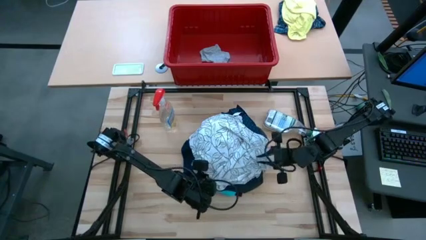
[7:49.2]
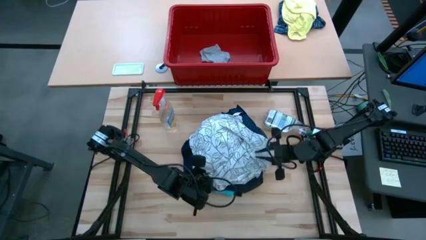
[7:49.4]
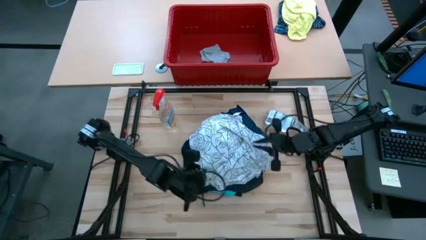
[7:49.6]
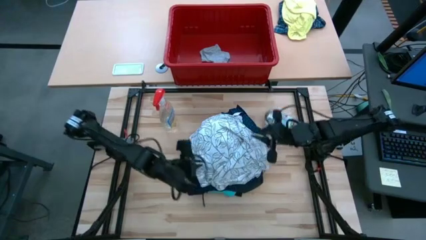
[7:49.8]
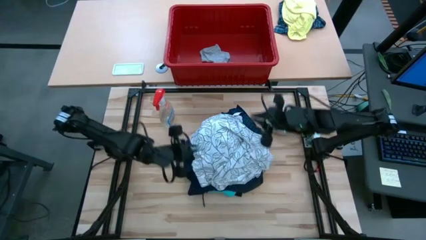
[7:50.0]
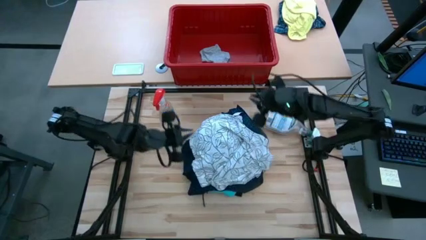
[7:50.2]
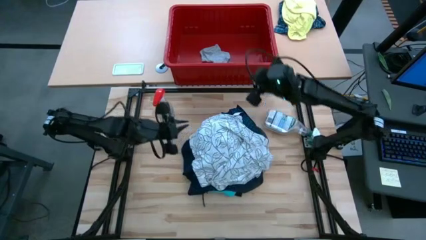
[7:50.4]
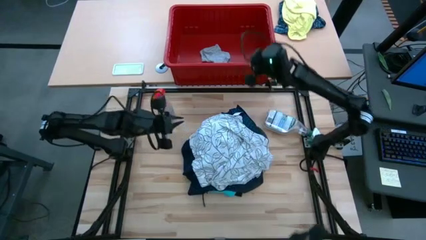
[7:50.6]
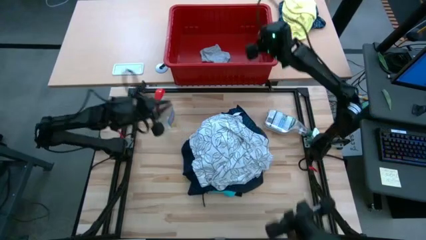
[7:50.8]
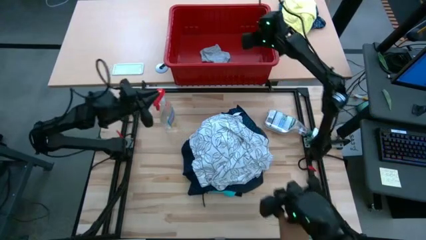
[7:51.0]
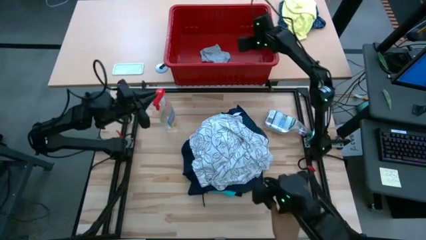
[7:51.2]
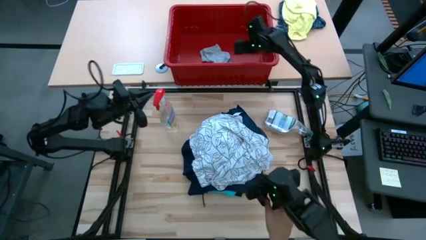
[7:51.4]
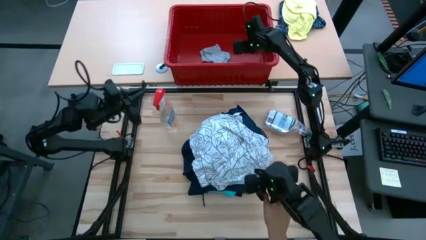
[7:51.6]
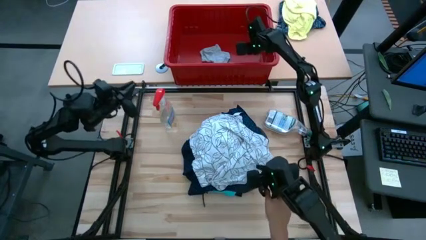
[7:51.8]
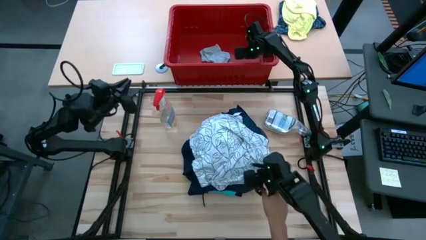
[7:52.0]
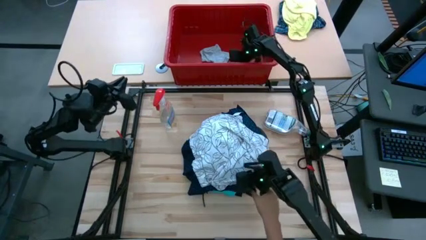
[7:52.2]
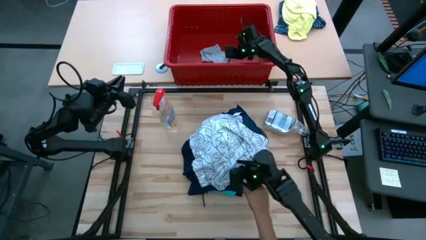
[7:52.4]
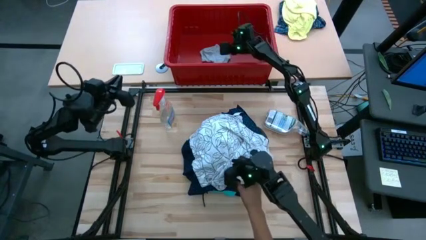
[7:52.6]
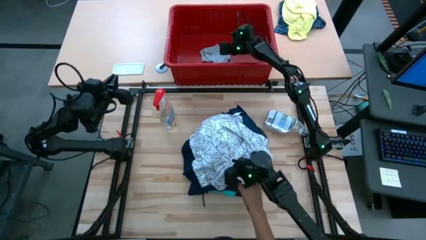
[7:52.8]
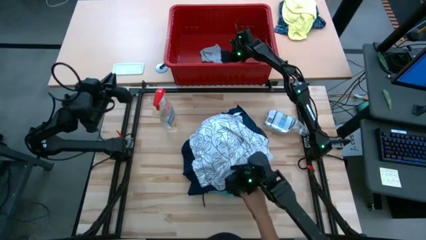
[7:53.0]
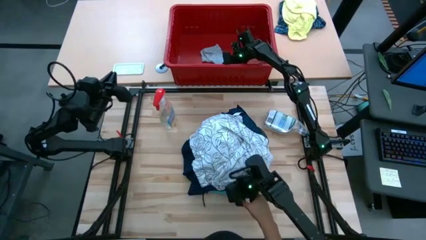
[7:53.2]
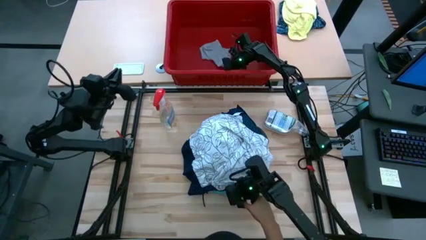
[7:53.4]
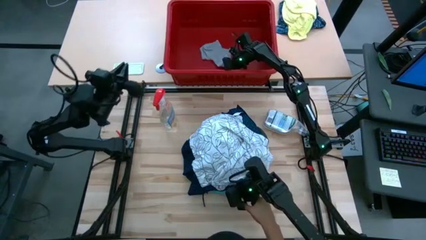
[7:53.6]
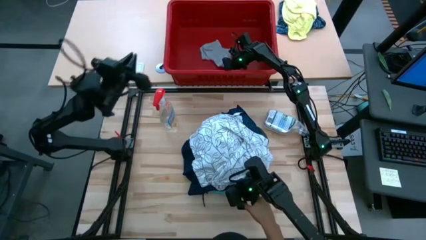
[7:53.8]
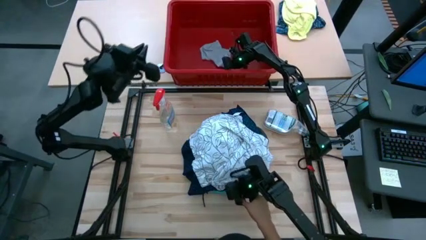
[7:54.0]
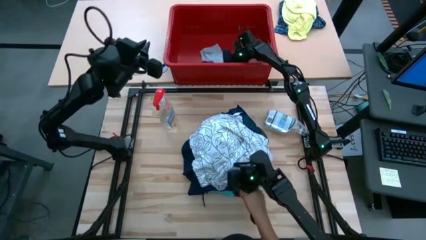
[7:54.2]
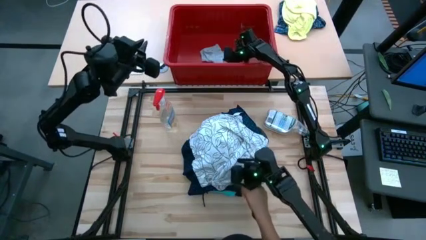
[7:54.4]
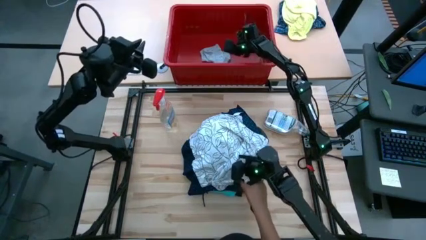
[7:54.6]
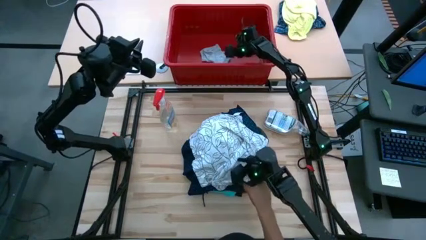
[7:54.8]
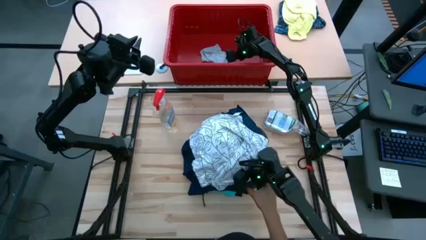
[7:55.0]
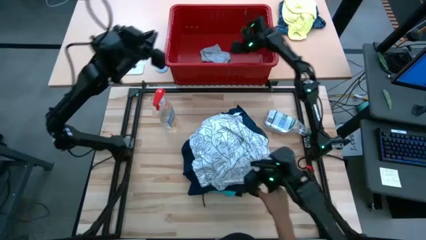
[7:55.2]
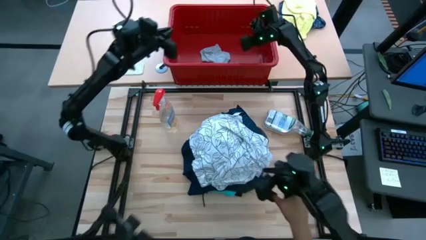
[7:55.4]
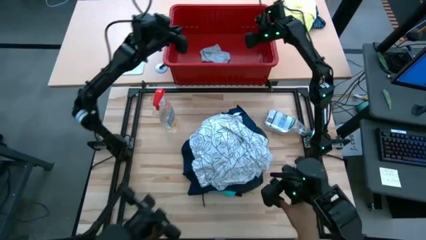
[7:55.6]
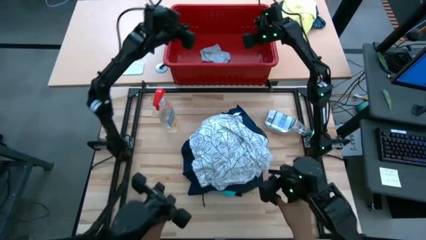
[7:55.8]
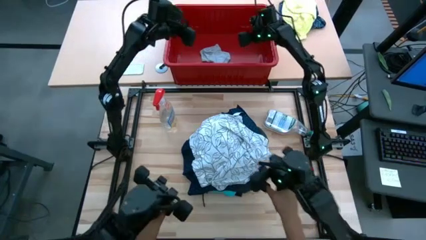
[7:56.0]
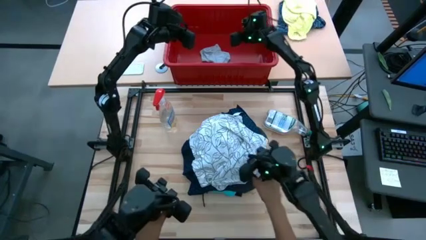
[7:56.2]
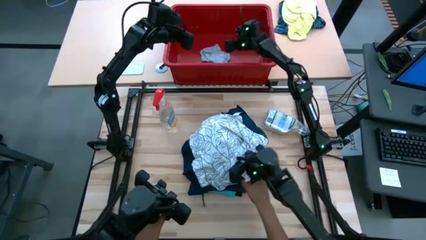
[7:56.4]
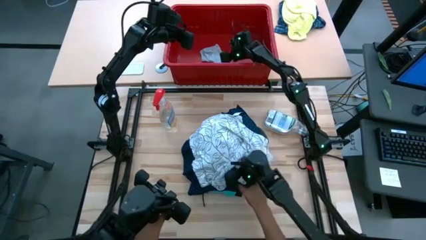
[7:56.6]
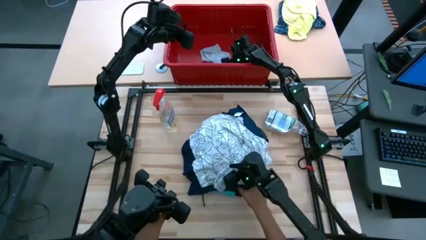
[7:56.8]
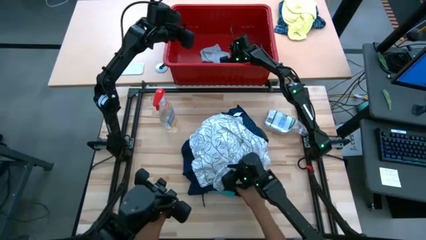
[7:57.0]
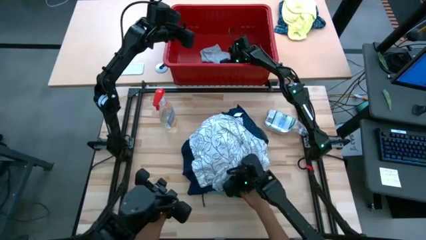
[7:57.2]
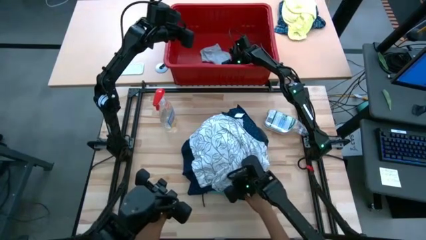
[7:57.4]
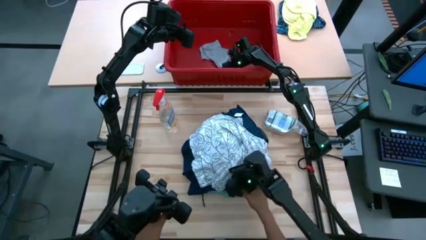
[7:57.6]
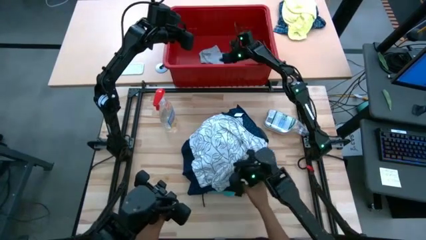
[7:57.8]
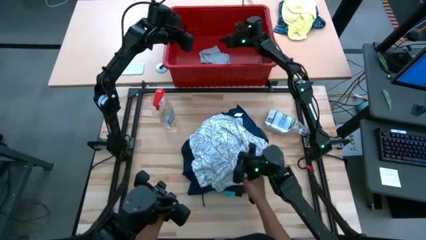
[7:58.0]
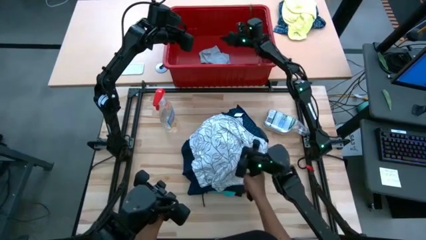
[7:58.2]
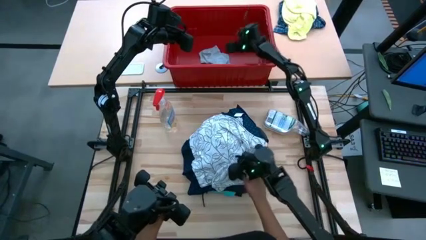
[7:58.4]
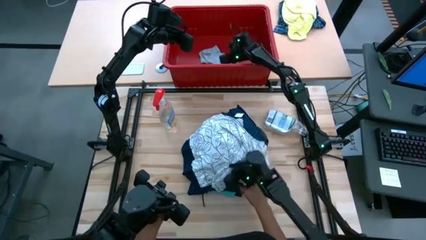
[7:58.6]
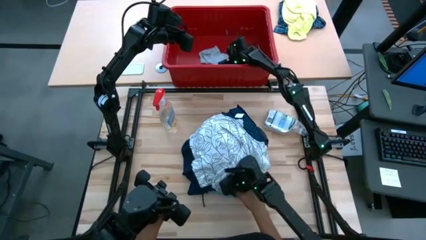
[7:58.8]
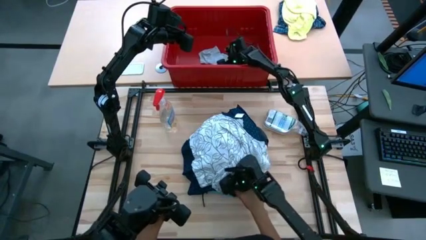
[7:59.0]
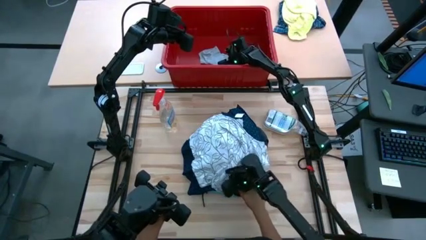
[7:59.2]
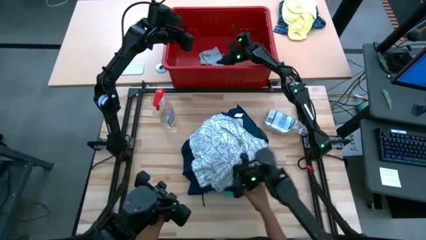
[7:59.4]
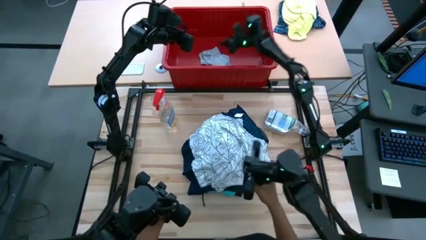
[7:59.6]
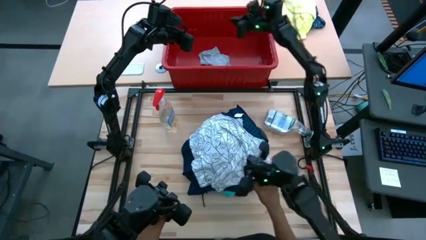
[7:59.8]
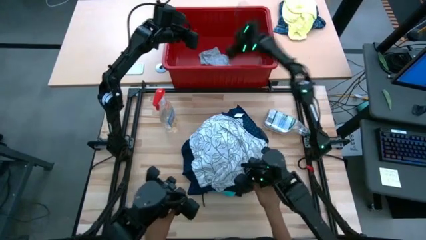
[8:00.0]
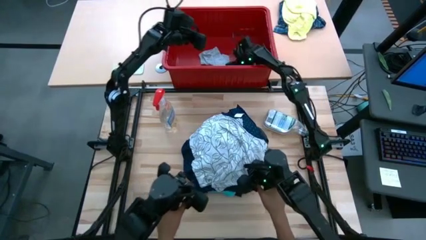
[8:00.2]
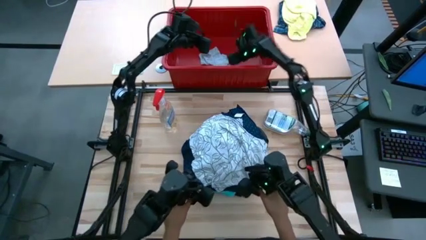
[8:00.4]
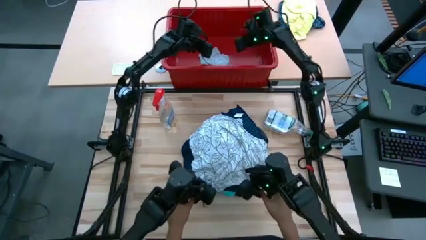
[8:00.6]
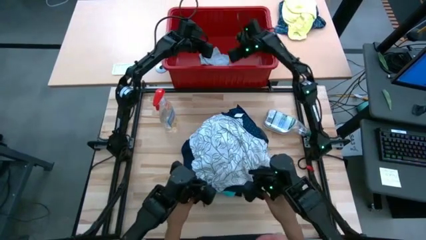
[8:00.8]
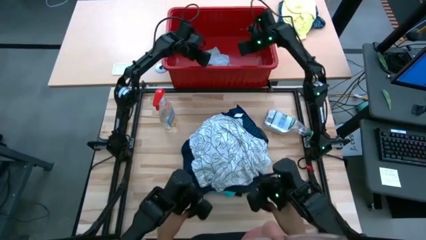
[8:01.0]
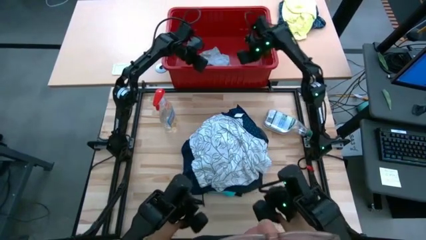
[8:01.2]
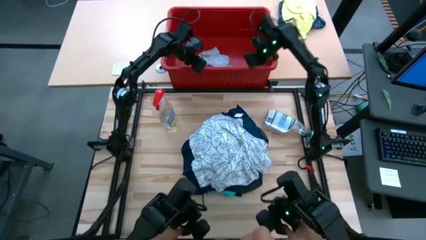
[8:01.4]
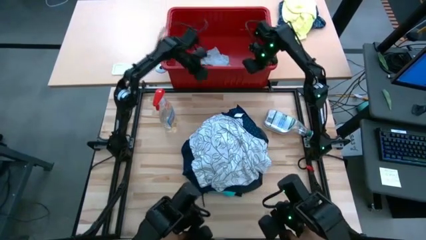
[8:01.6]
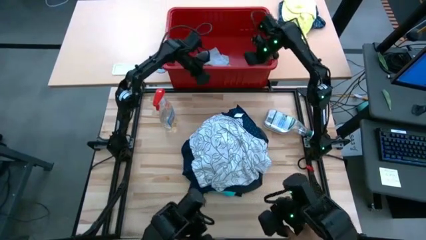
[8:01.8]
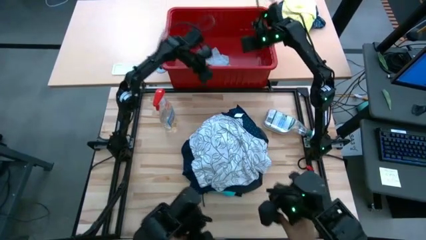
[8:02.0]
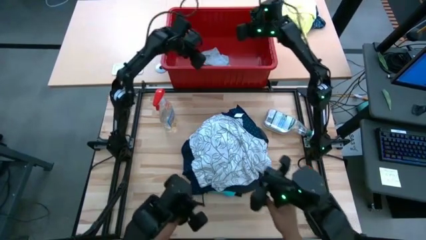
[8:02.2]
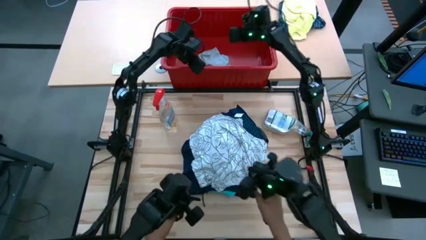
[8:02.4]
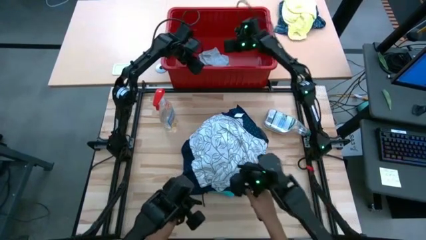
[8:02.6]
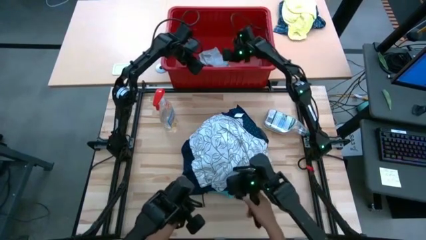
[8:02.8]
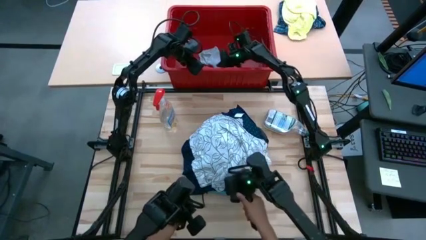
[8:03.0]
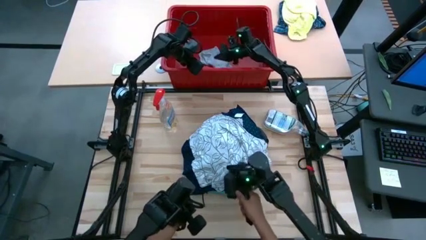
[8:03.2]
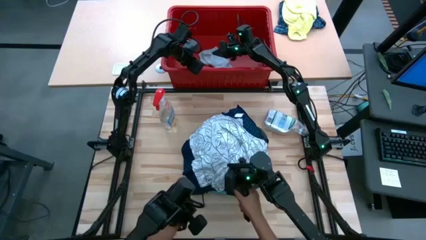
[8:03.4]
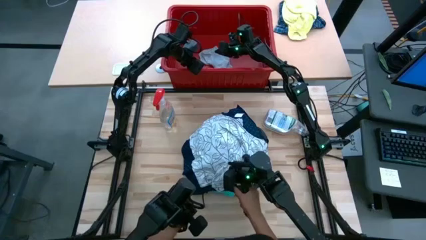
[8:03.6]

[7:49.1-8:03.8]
Task: Fold Laundry from Bin
Remove the gray shorts from the red bin

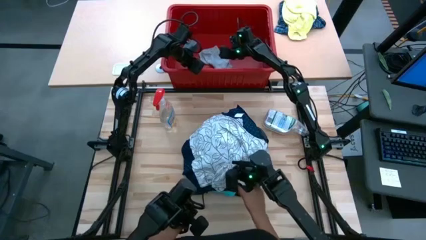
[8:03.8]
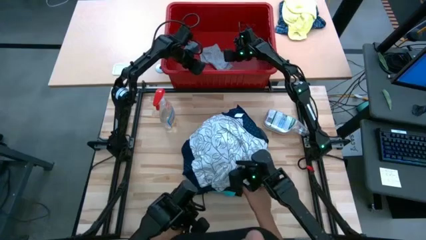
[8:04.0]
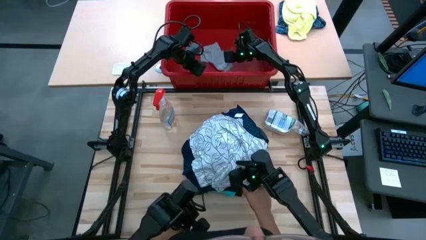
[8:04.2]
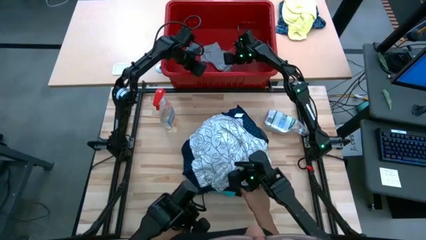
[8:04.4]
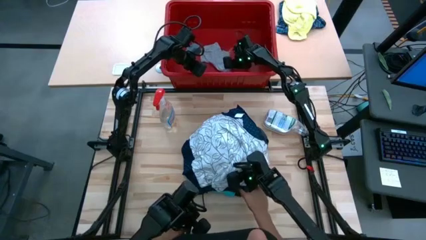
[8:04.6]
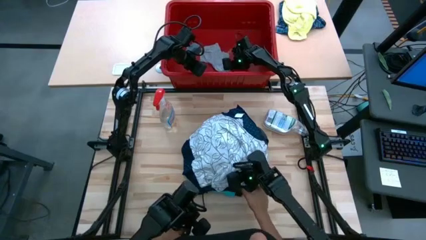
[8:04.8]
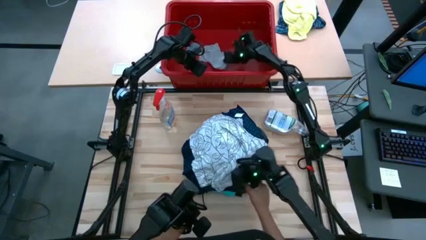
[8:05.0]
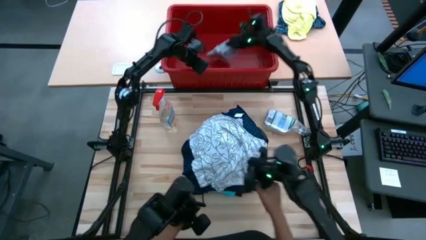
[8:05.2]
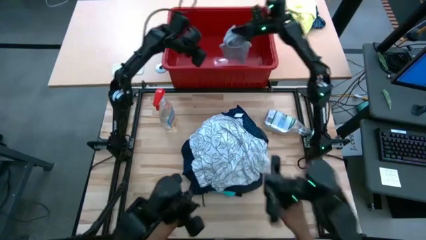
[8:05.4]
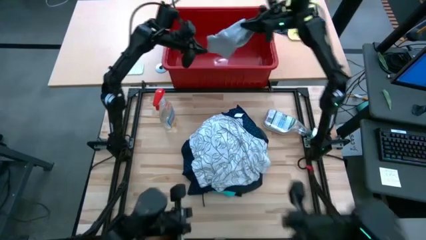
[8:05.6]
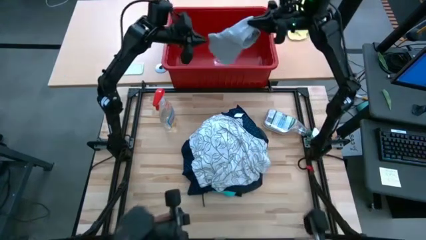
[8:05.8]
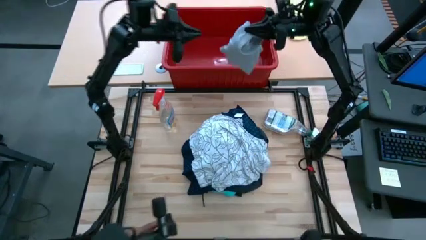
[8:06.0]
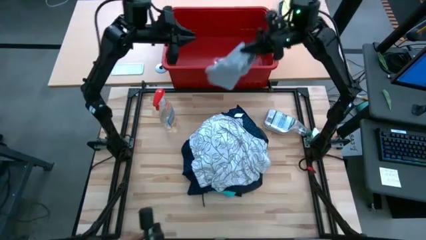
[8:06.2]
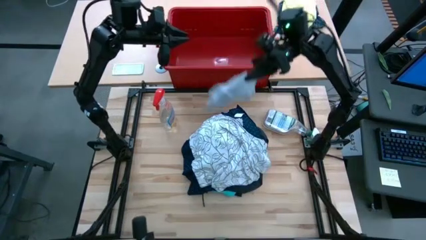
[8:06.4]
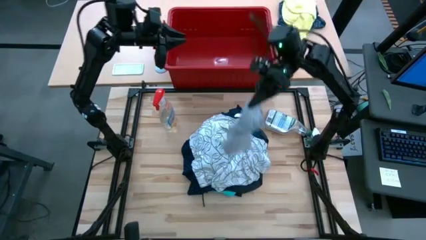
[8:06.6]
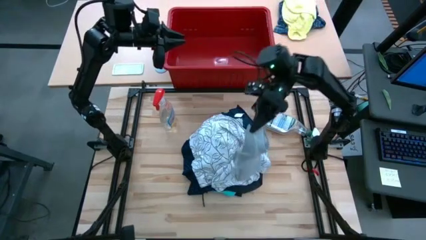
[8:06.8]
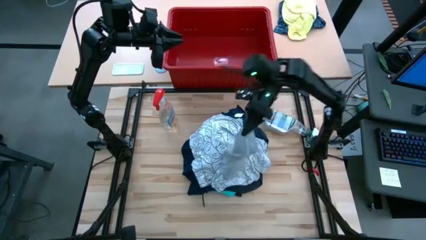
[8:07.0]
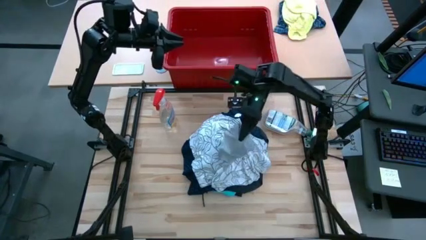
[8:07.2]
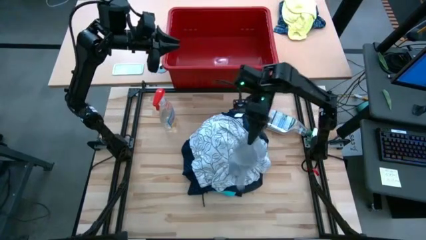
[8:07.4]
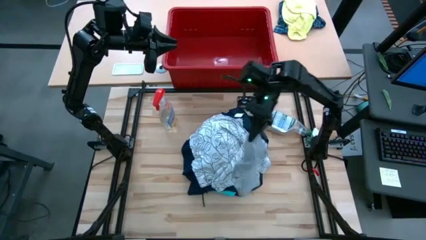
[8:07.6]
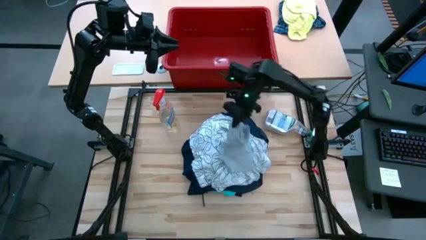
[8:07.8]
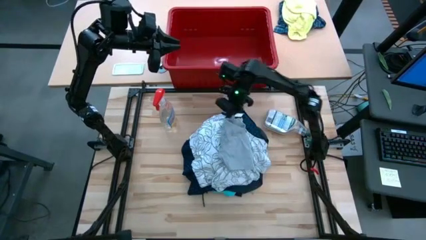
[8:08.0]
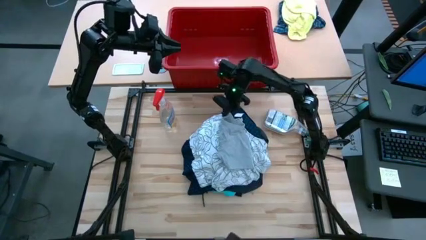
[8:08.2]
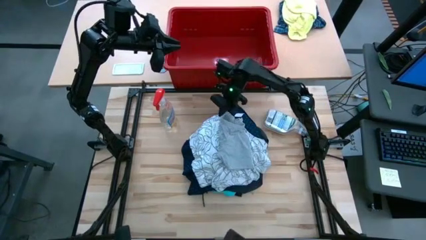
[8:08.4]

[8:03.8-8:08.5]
Remove the gray shorts from the red bin
